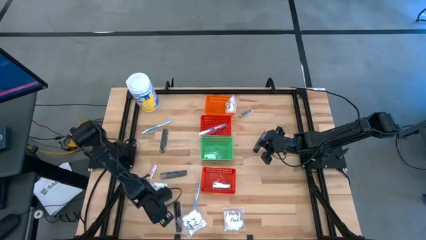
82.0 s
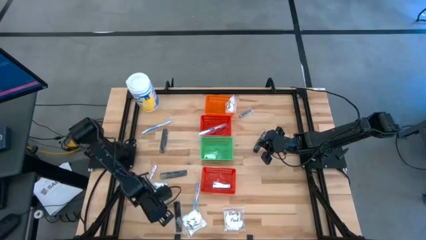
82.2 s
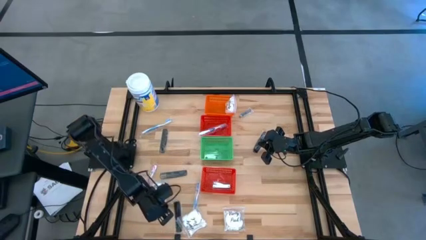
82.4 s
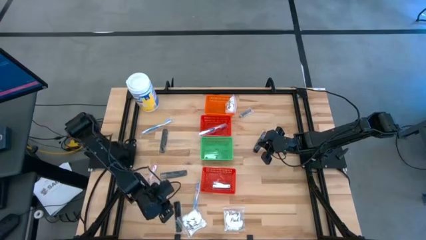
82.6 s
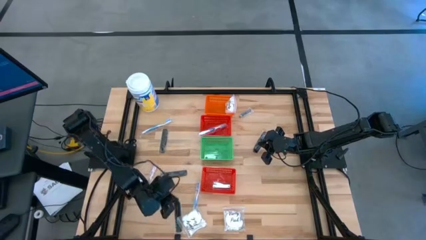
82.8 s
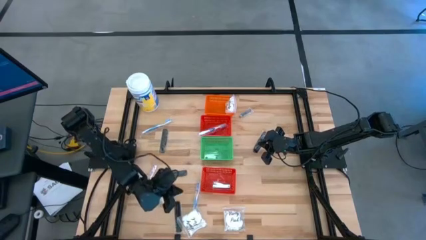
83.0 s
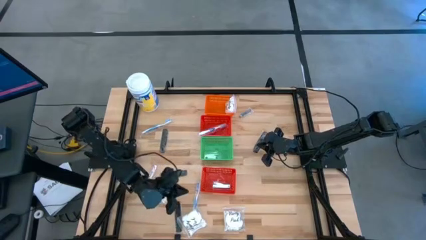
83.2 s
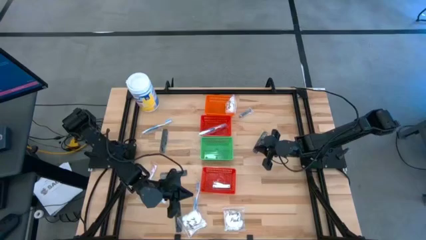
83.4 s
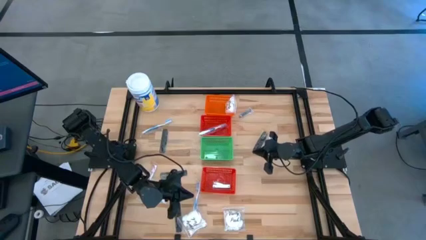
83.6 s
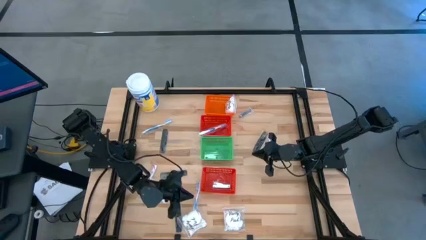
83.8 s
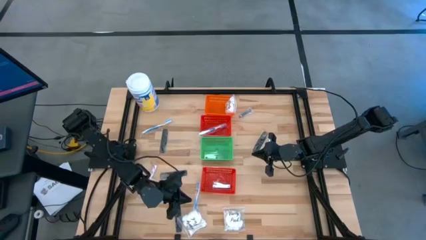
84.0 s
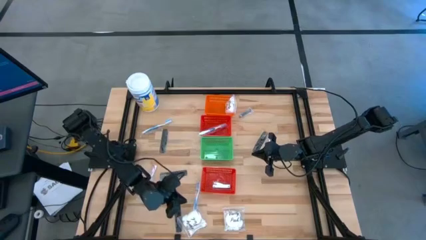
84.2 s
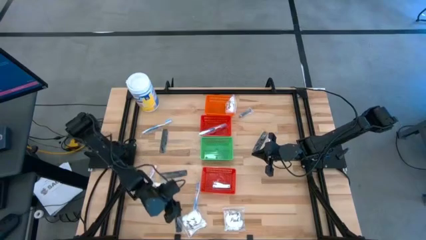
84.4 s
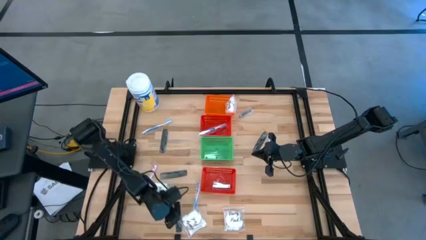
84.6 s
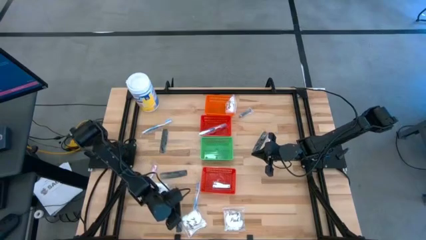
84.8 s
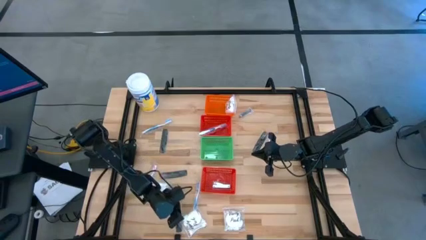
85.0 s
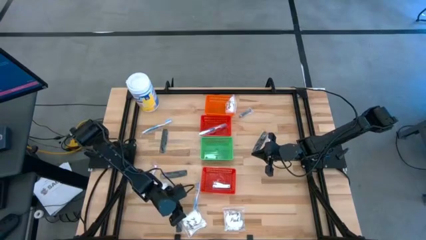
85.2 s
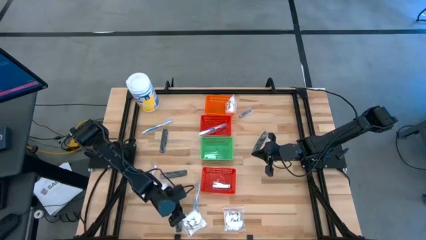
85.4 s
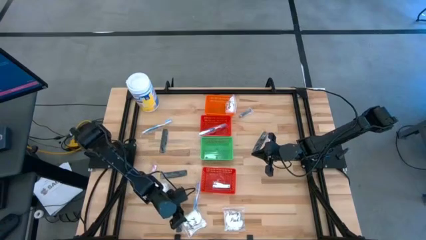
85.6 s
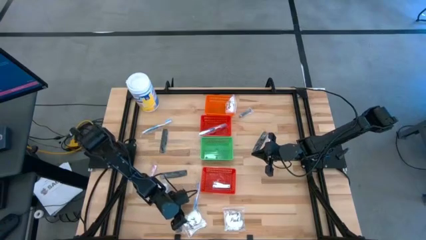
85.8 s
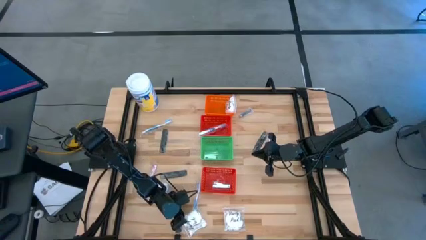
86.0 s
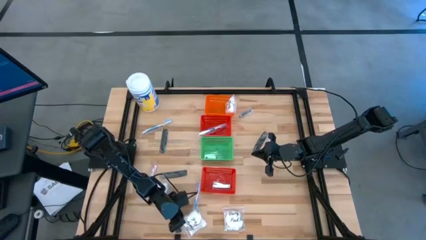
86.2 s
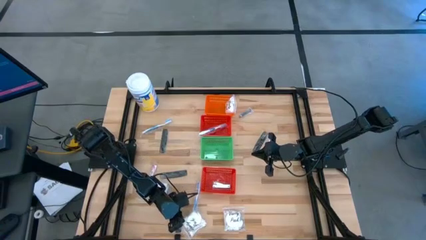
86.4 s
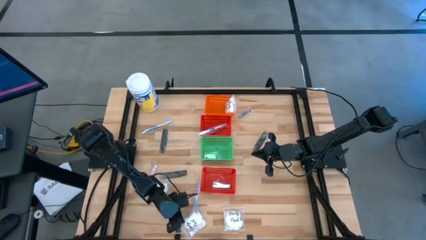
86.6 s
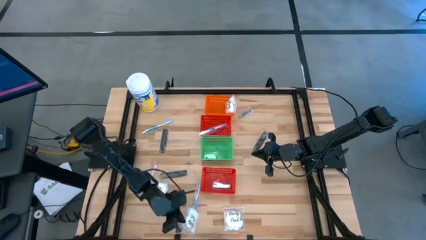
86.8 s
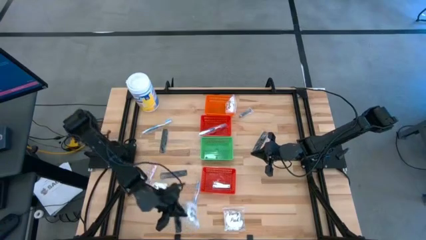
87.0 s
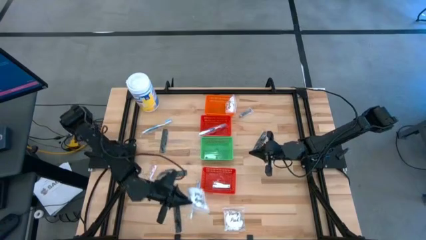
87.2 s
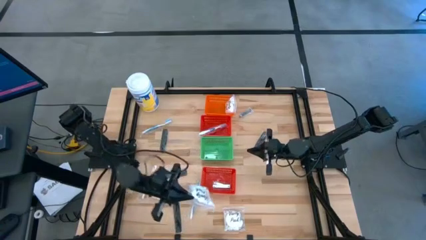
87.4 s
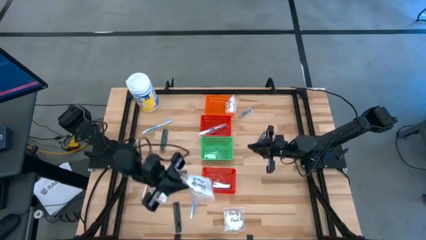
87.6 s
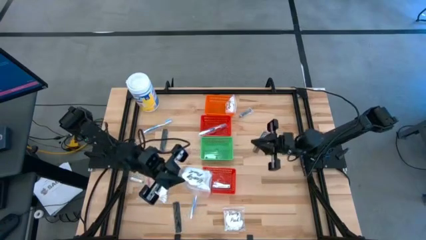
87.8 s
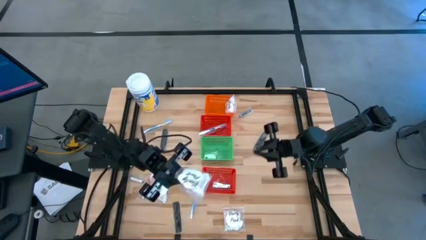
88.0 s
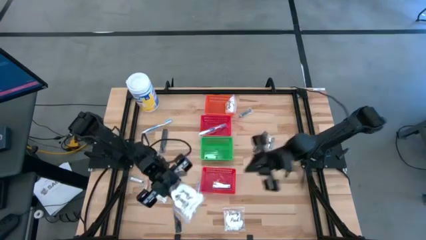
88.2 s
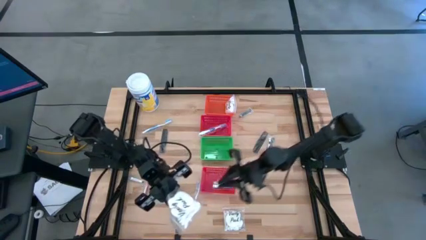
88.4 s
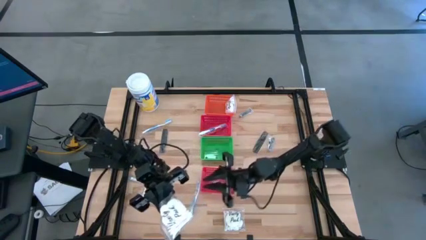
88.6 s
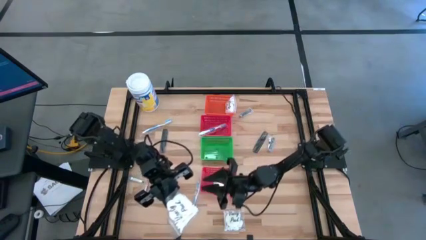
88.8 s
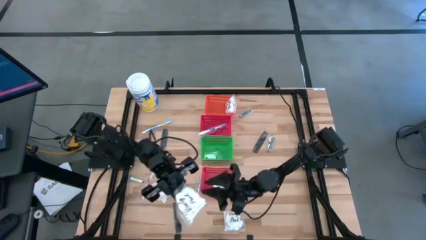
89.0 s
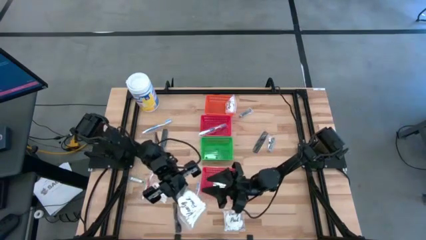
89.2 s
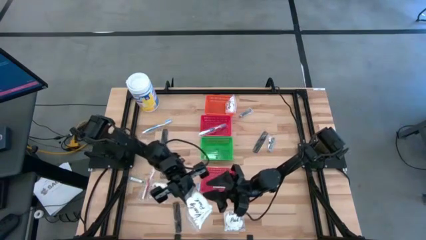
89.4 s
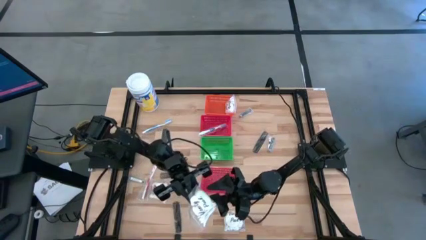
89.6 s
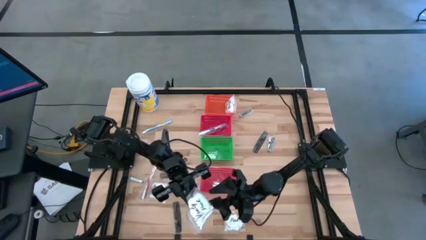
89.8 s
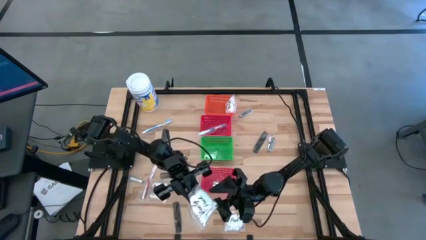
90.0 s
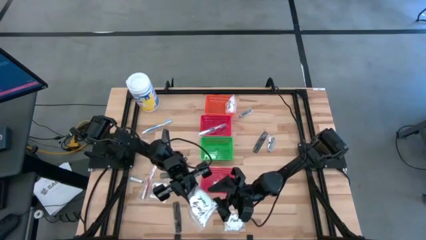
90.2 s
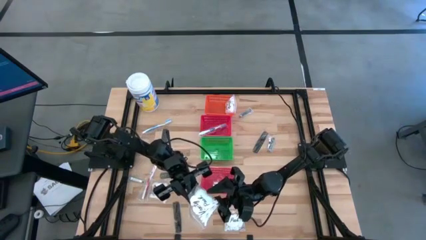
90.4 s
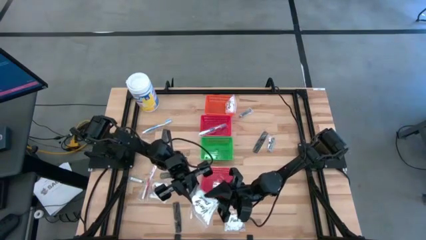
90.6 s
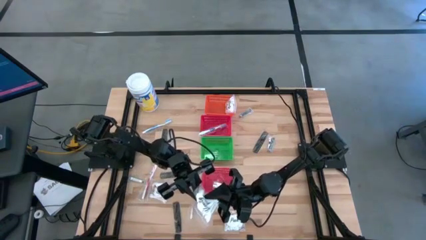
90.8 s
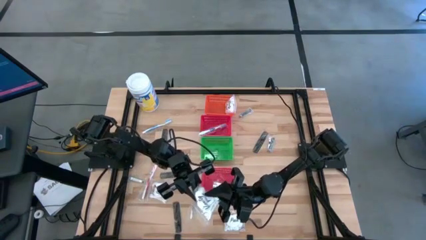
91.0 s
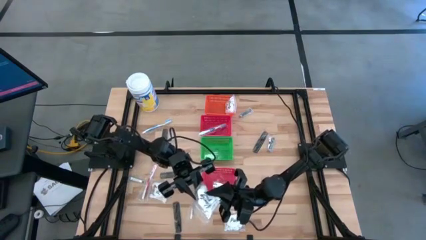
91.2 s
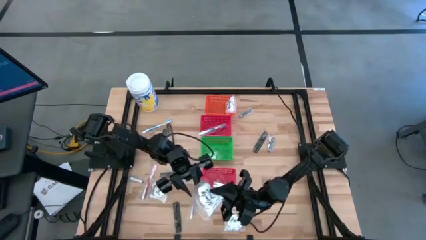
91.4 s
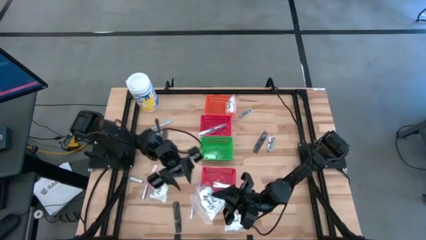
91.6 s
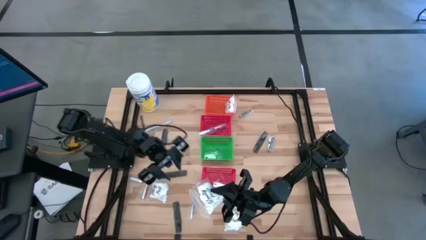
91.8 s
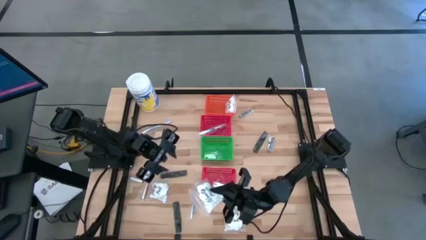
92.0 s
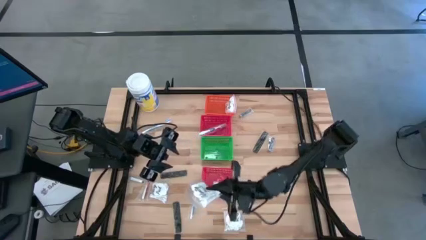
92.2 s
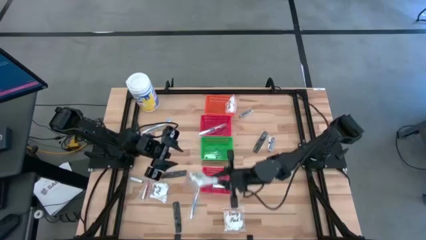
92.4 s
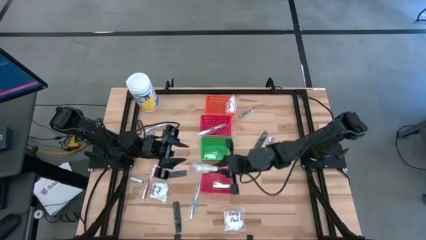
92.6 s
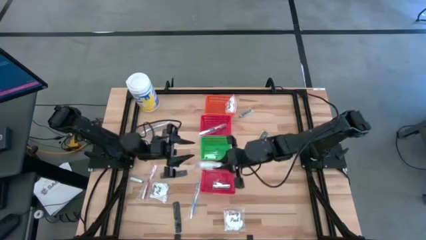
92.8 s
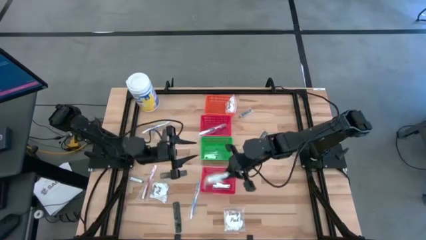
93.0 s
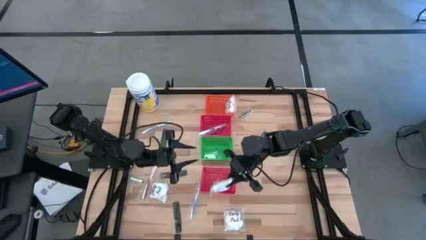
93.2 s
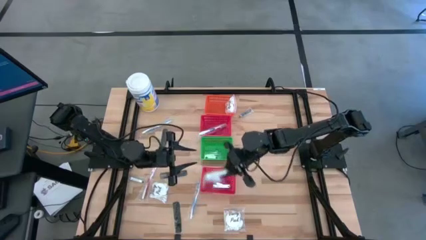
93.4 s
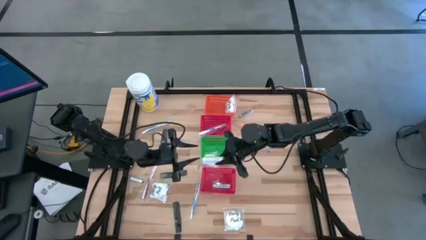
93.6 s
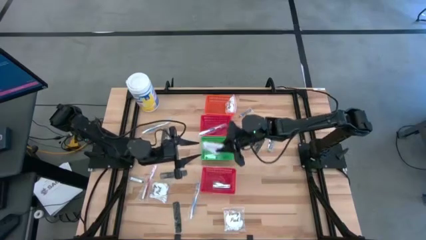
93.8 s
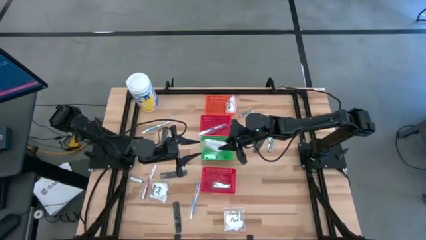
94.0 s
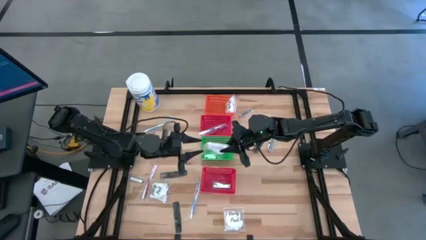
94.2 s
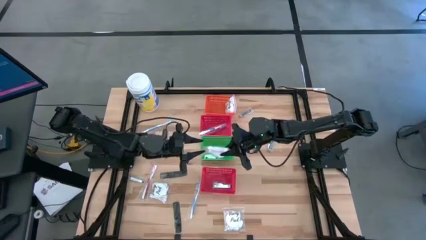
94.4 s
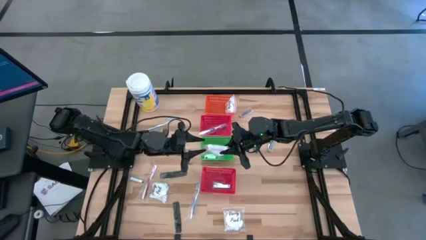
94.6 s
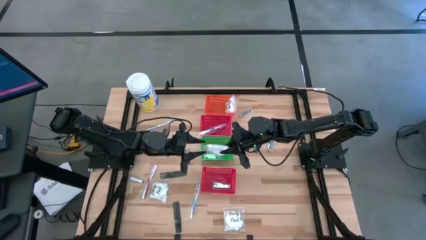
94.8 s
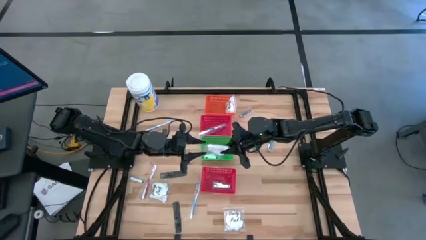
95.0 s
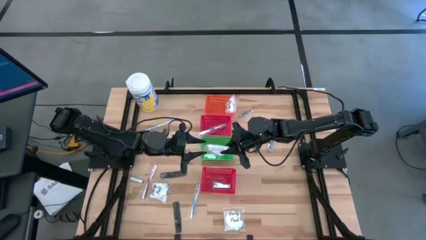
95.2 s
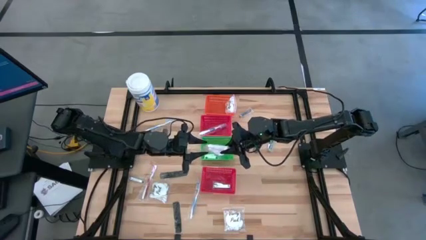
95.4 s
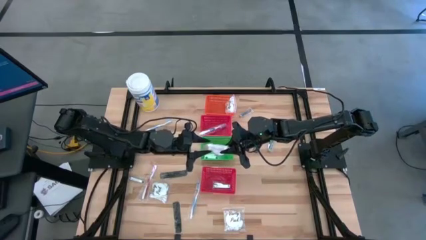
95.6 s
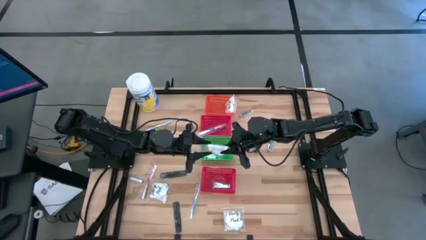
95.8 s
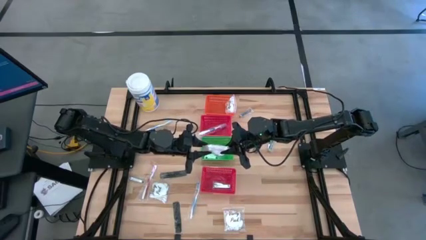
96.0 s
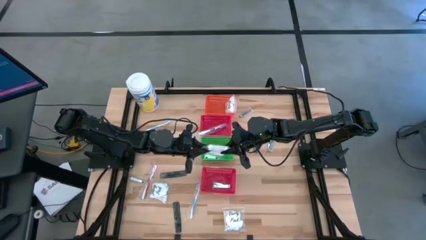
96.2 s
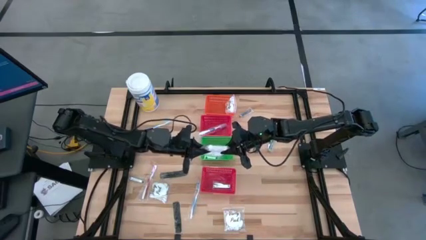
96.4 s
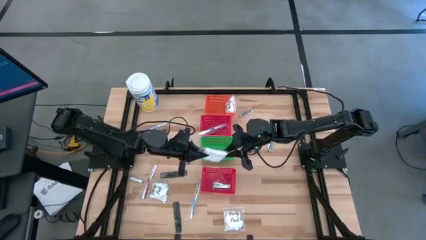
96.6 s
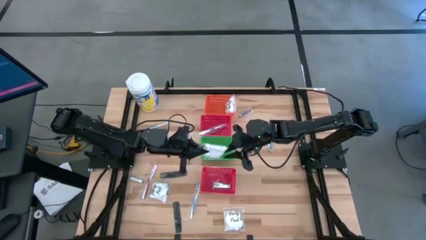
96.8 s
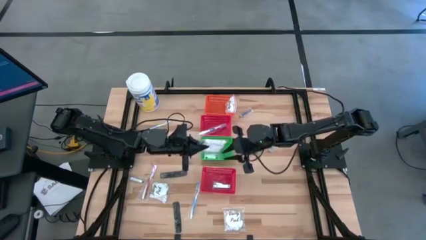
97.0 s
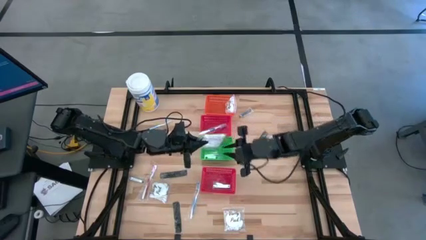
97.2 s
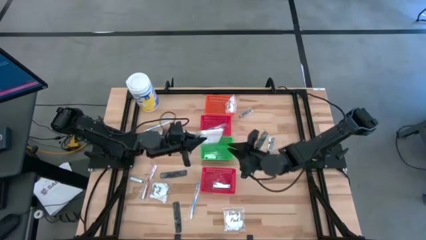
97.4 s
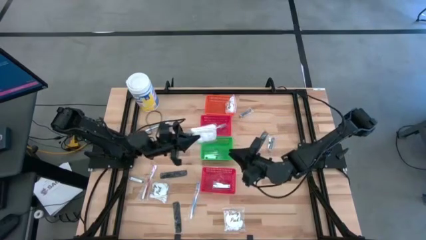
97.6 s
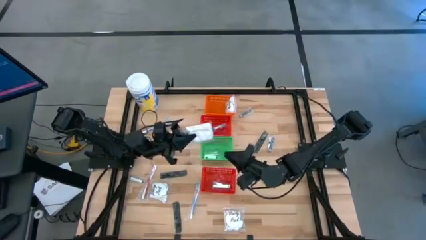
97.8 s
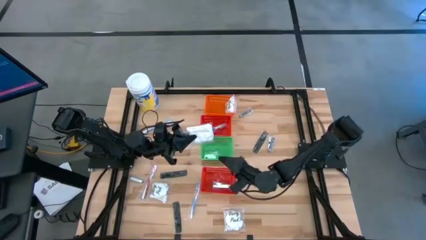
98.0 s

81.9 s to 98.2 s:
Task: Pick & Place Travel size toiletries
Put the transparent cotton pack into the orange basket
